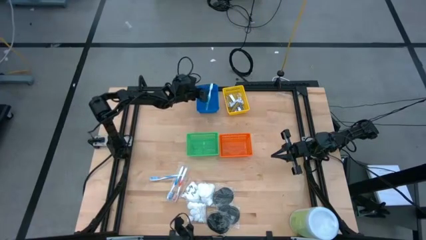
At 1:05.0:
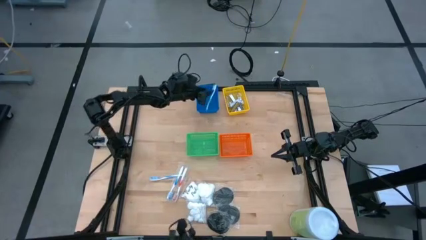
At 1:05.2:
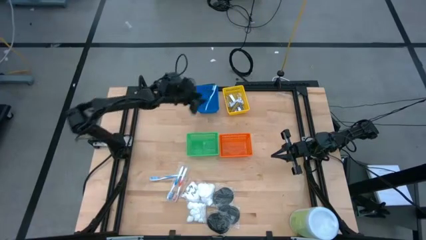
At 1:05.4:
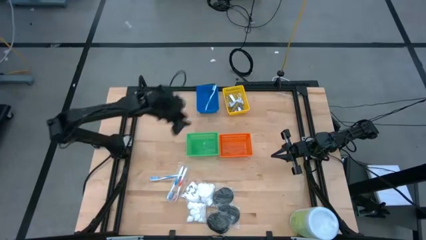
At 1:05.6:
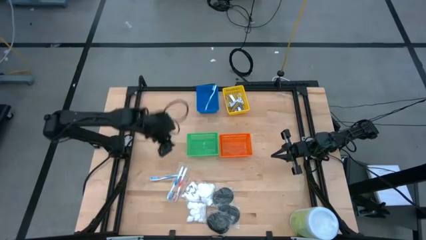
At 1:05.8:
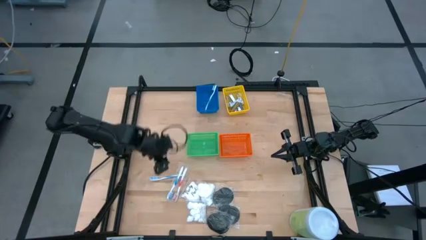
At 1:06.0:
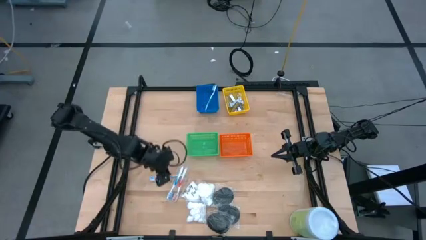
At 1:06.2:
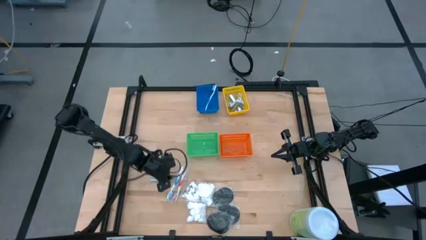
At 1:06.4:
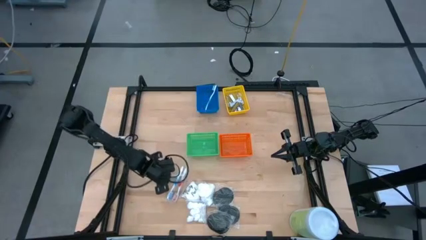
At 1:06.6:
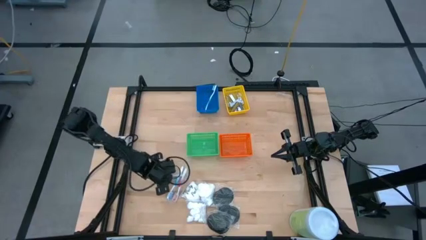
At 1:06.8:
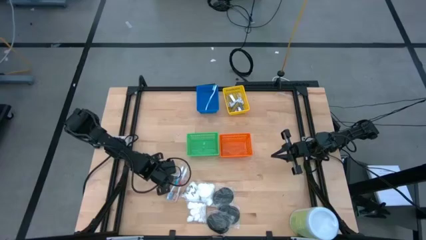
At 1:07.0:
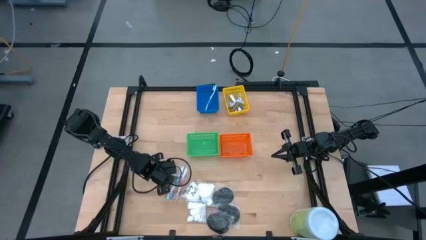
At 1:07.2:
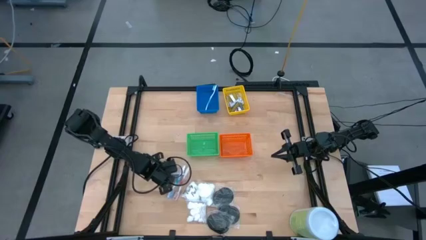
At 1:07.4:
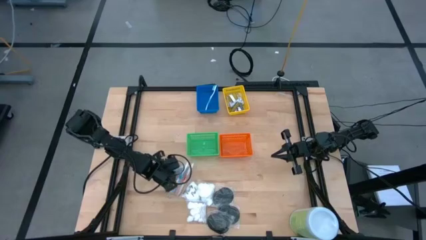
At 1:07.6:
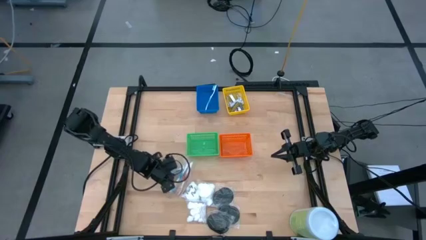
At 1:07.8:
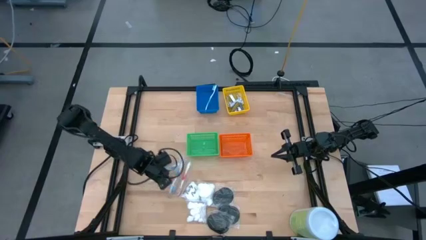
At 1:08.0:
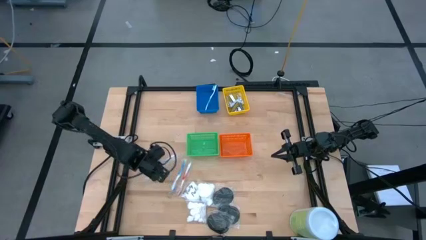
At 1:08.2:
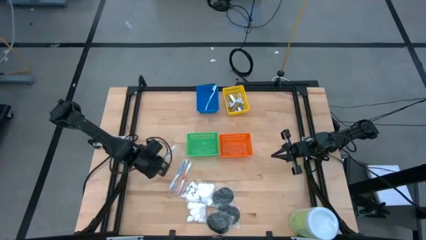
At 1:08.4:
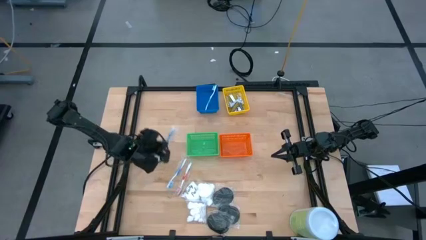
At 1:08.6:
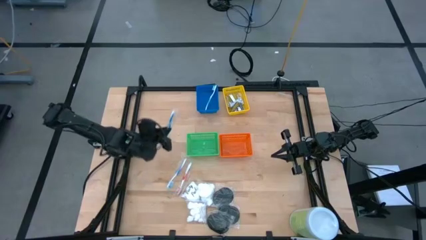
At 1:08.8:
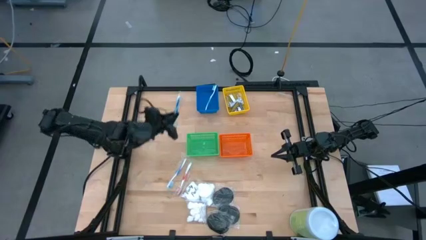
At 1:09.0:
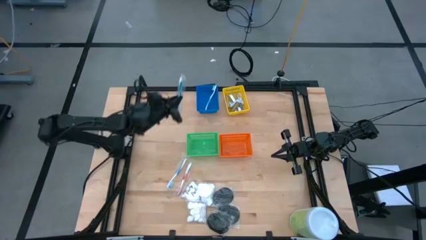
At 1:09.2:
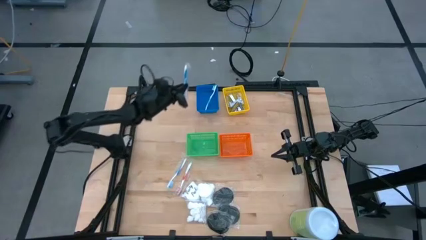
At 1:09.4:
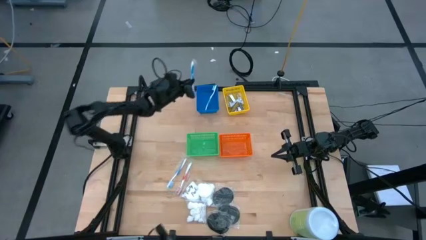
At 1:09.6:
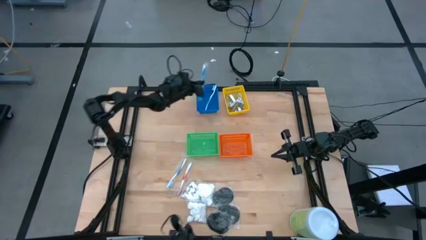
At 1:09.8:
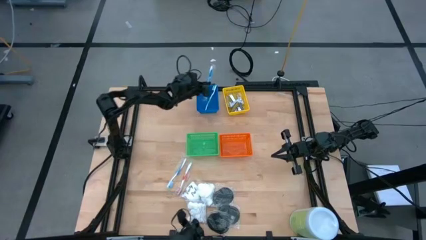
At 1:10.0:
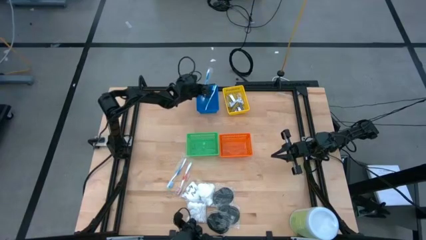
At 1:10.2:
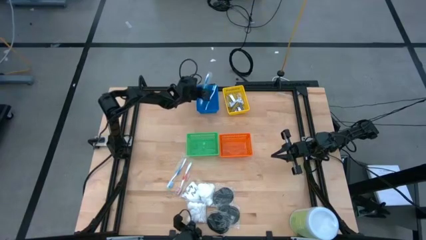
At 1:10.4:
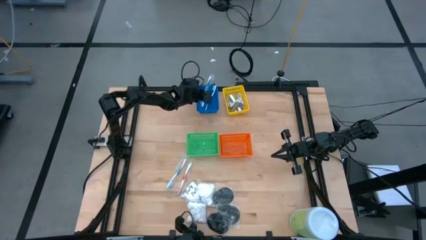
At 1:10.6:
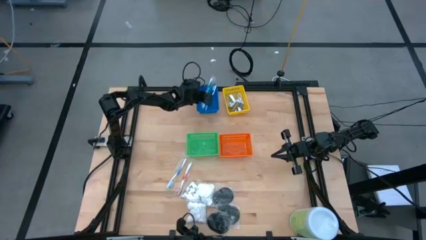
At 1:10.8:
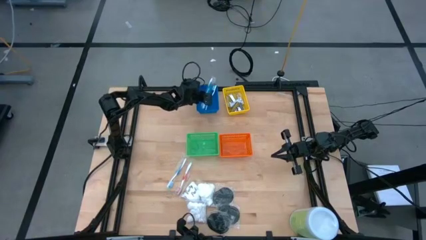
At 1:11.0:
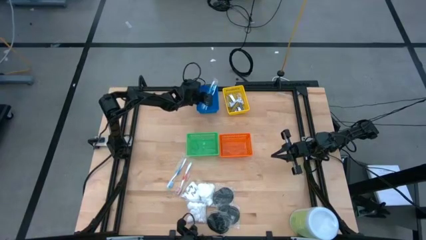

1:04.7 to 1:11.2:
Task: Pick & Place Travel size toiletries
Put the left blue toothbrush into the blue bin

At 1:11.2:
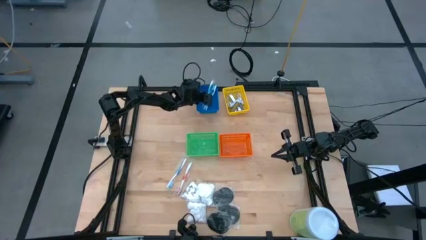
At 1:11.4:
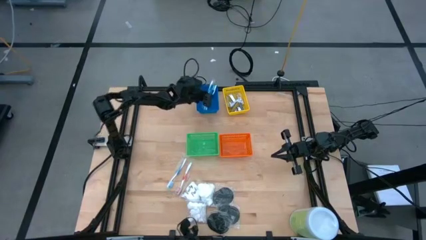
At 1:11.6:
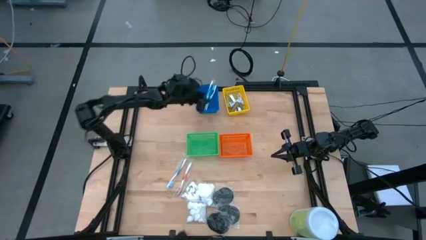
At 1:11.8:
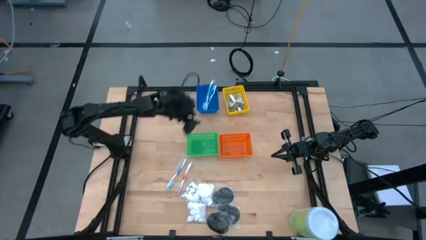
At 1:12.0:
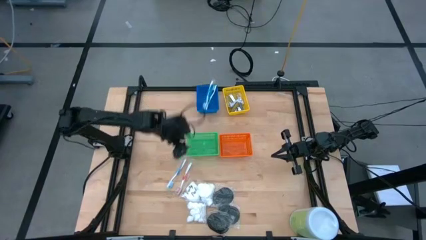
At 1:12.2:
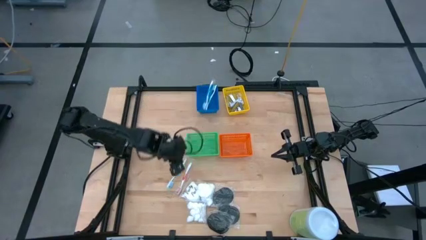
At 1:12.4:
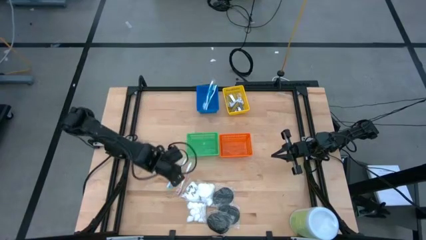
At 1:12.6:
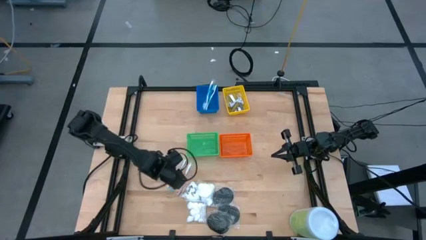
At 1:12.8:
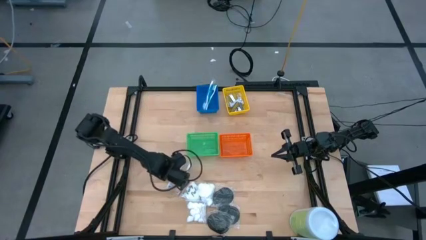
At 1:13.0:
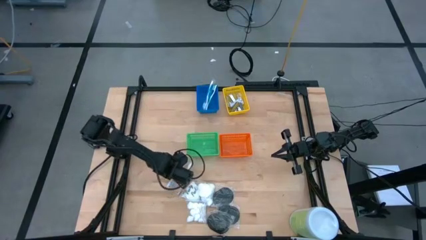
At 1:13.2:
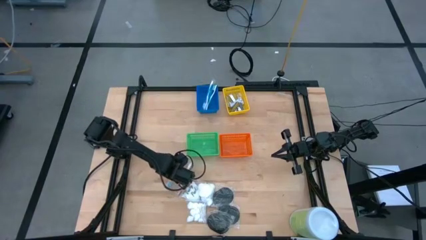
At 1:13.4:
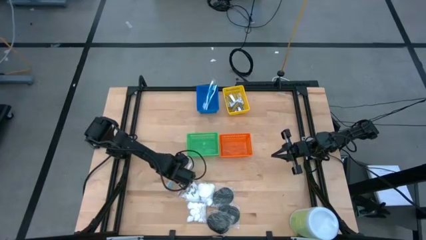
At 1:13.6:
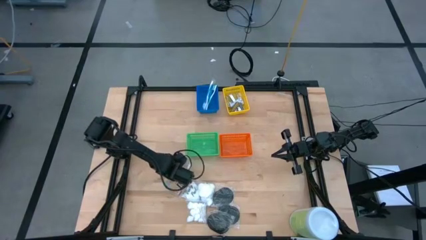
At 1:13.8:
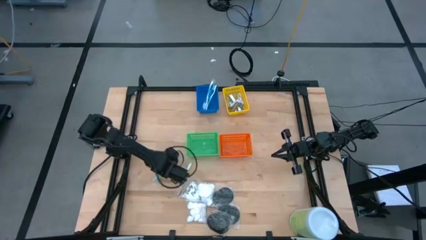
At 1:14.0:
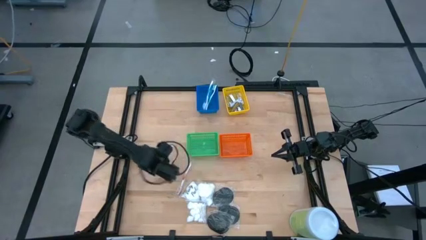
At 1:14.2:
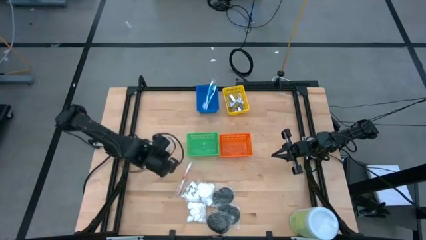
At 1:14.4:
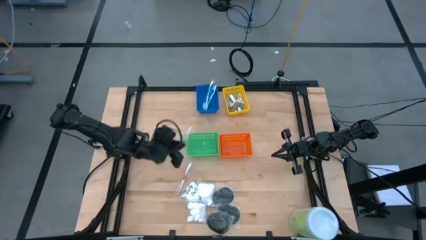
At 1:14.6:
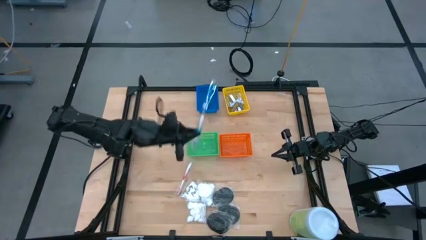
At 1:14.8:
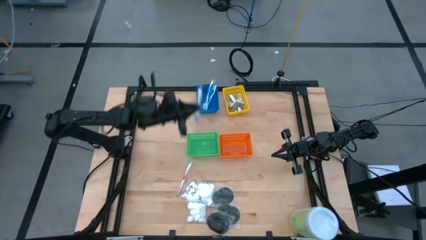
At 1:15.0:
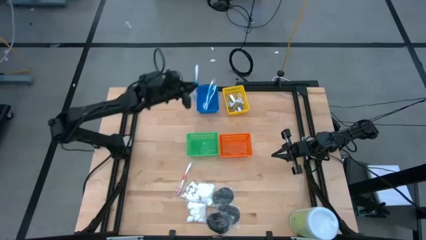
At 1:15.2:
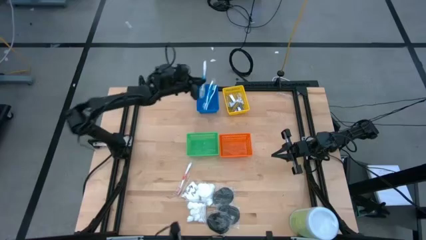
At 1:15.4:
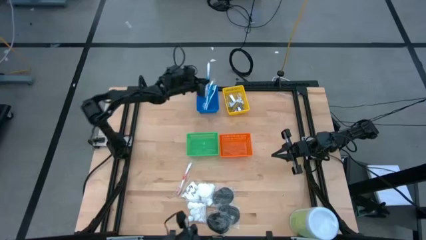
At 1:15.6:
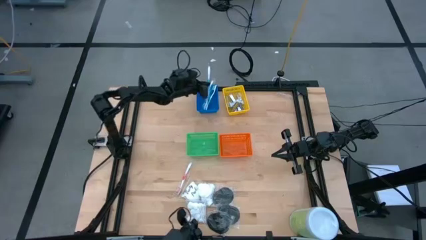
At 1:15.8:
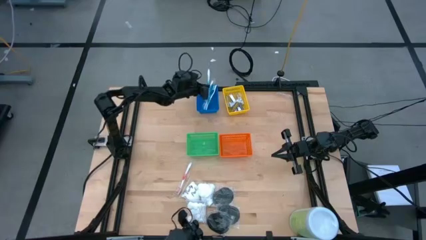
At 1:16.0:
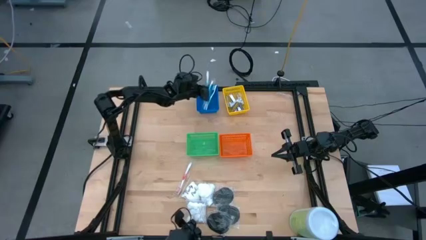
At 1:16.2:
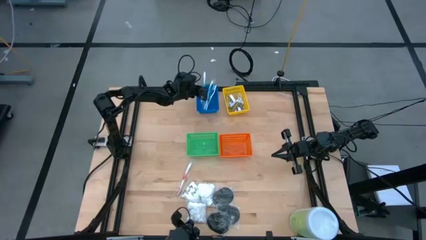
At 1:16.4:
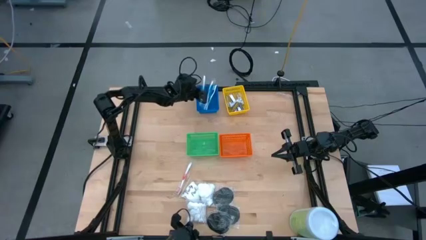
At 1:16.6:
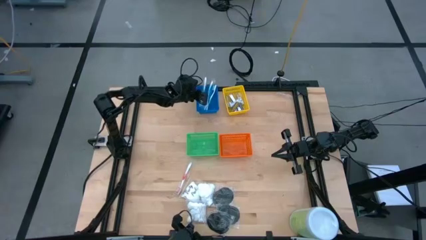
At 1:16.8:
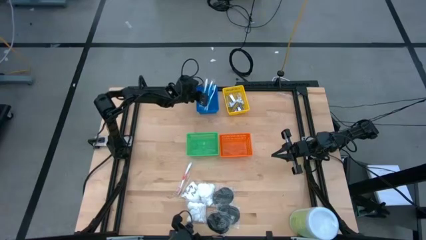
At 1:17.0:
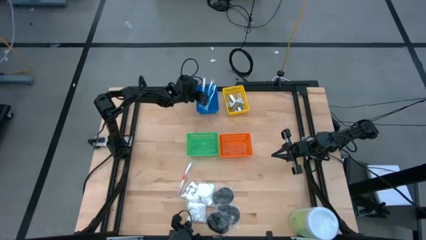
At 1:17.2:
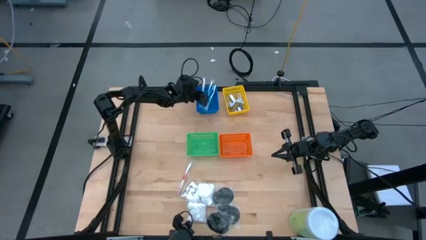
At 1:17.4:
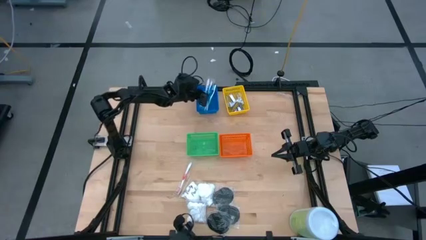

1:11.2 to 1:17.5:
Put the blue toothbrush into the blue bin

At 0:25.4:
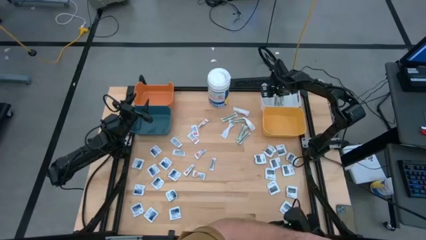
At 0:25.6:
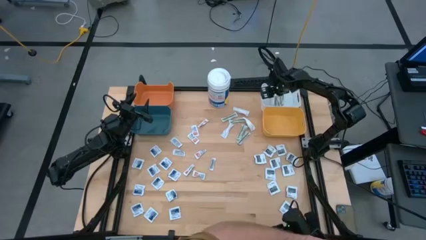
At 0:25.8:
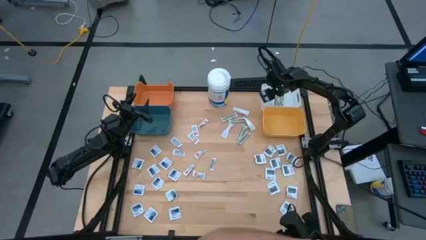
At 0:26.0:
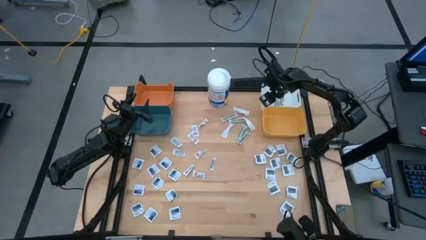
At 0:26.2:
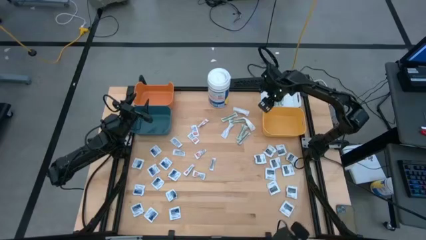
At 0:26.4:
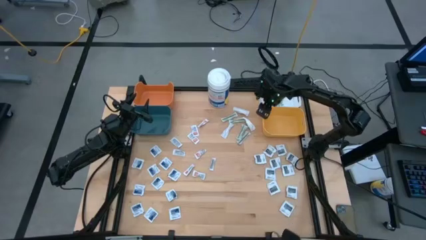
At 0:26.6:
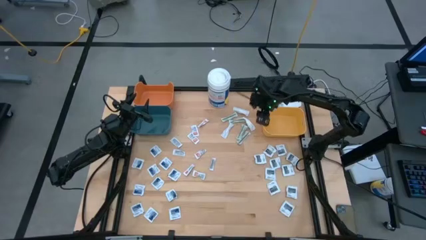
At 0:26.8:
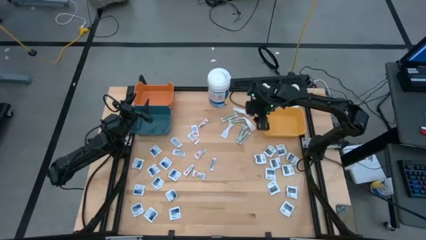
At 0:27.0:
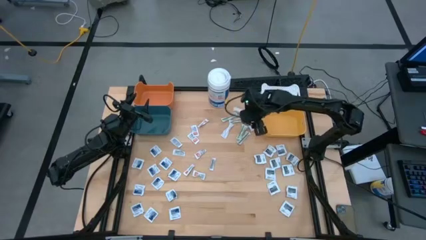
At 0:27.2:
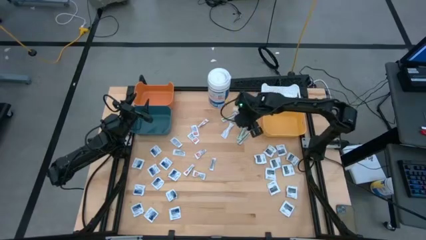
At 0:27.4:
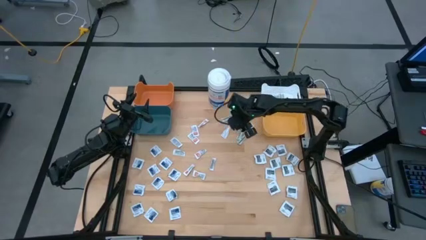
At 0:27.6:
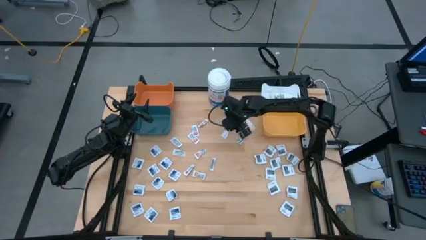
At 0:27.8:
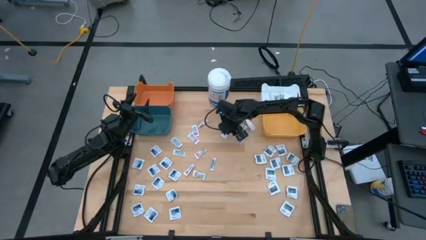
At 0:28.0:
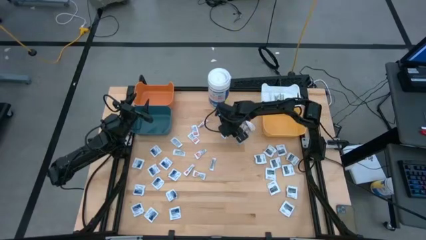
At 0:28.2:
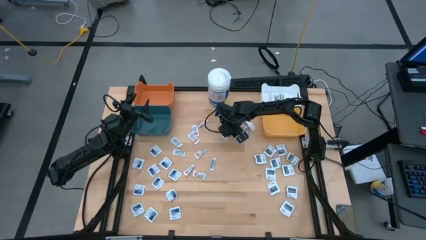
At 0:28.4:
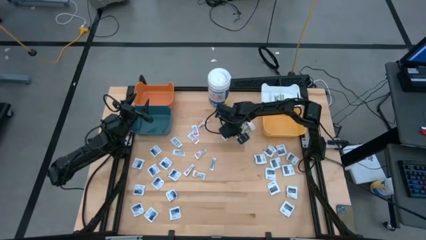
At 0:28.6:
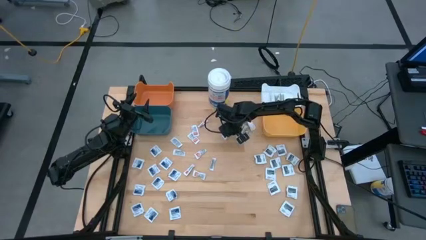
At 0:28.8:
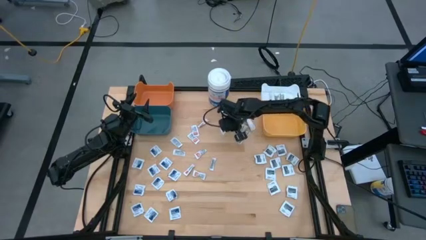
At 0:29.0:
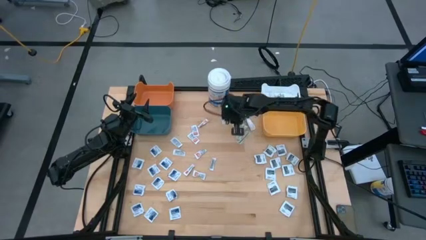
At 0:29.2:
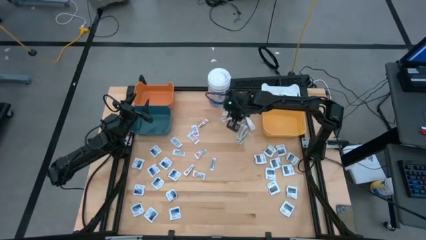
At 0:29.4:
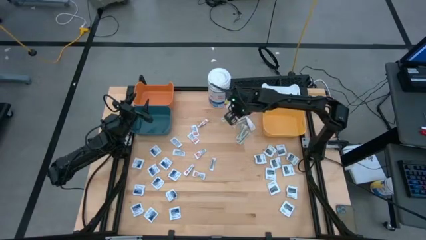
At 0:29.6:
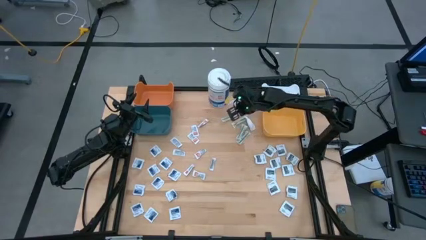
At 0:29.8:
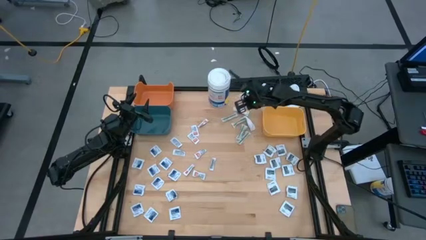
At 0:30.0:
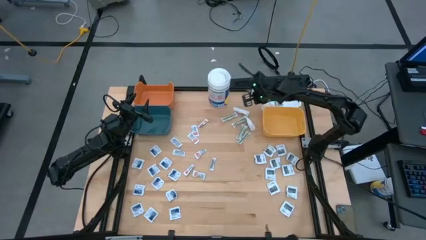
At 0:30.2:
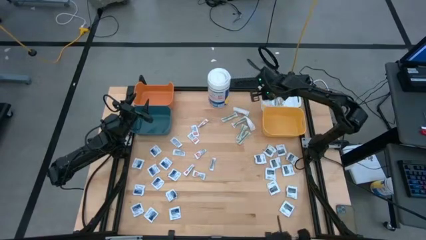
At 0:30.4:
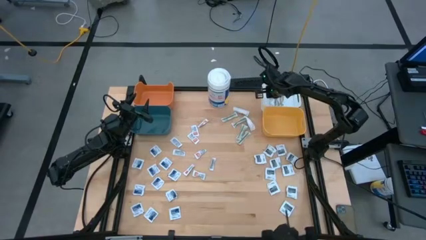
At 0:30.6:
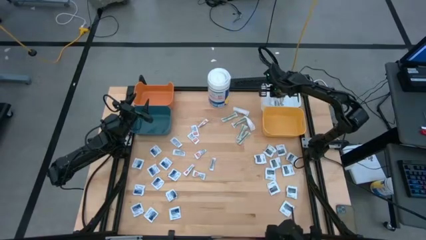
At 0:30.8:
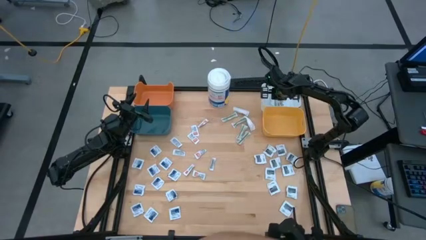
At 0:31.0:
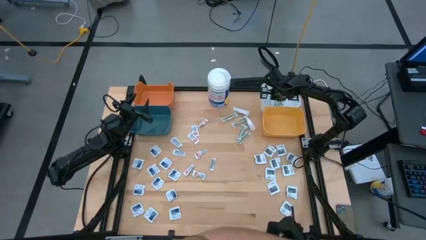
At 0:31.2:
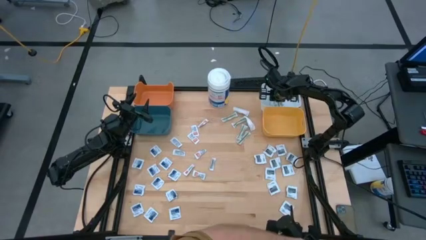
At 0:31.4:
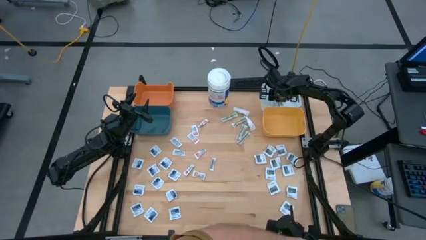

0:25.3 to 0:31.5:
Task: Pick & Place First Aid Supplies
Put the green bandage into the white bin
